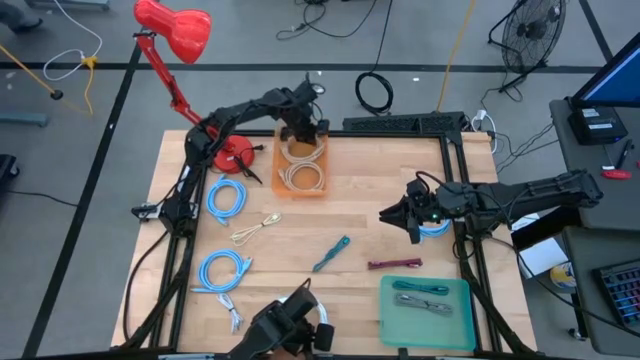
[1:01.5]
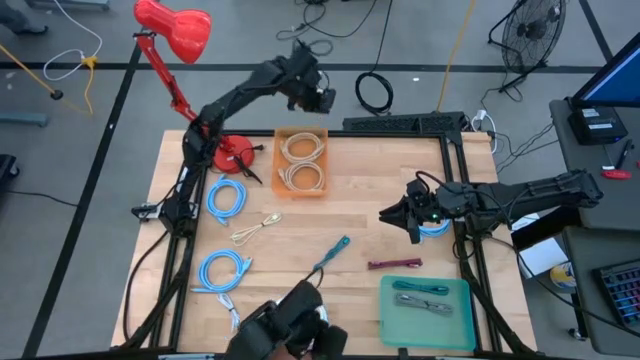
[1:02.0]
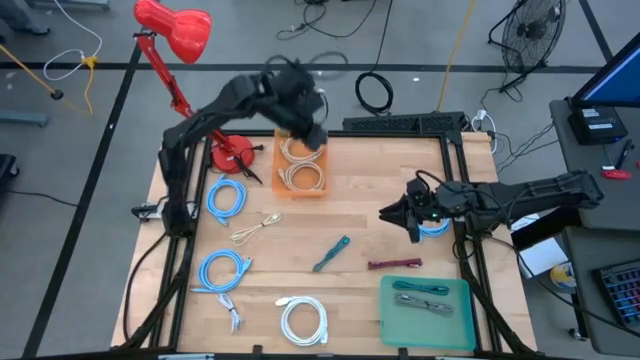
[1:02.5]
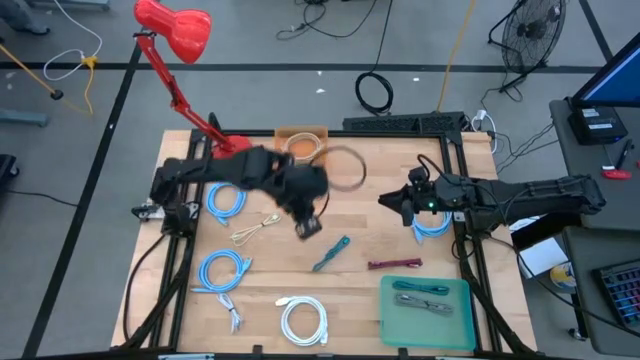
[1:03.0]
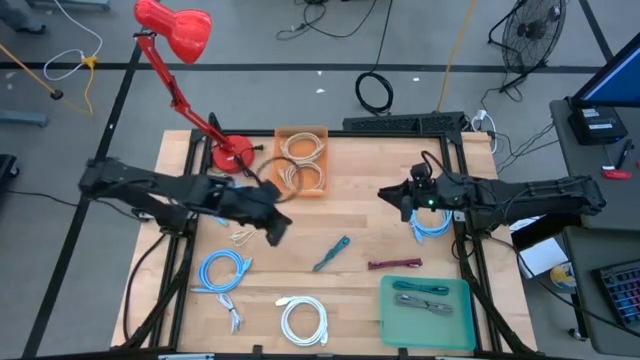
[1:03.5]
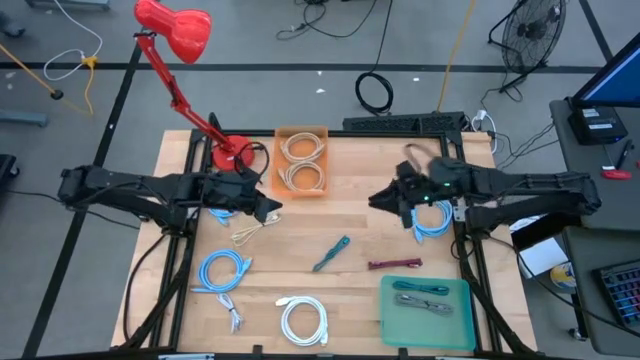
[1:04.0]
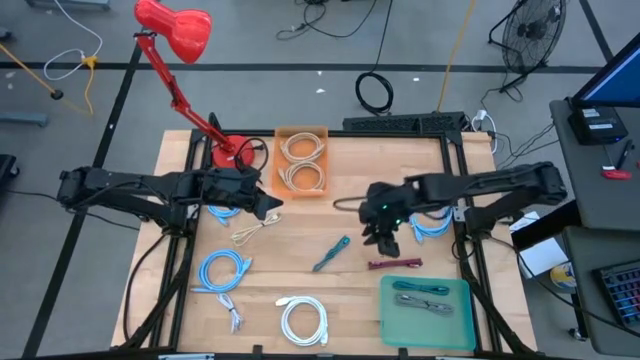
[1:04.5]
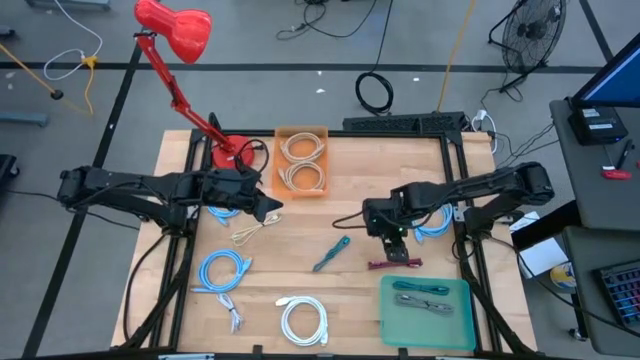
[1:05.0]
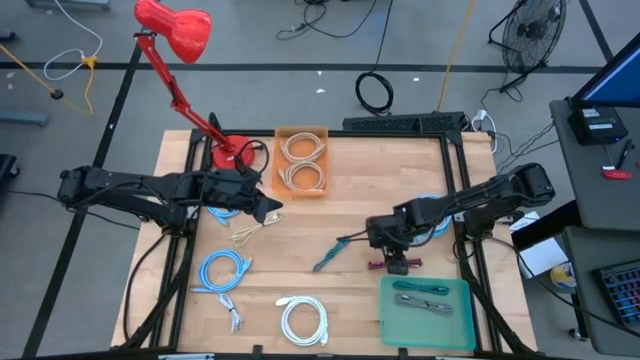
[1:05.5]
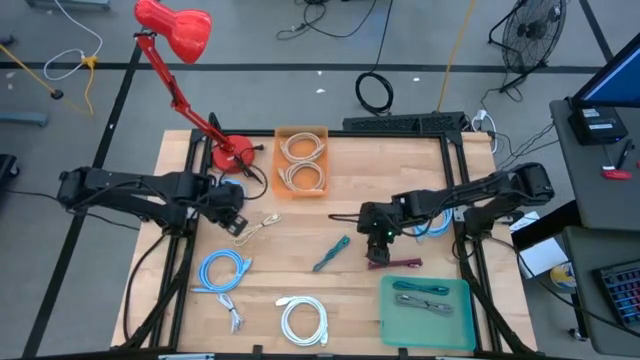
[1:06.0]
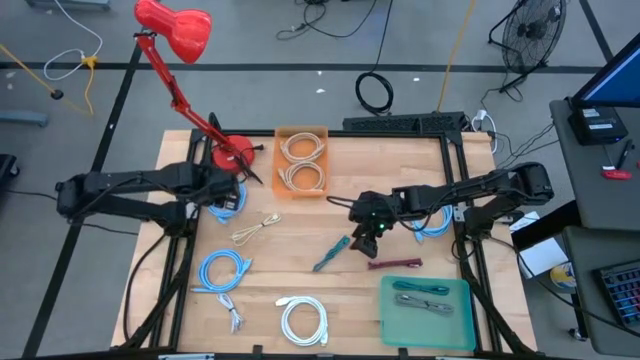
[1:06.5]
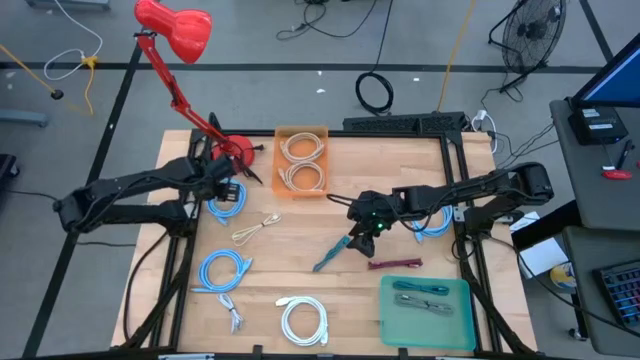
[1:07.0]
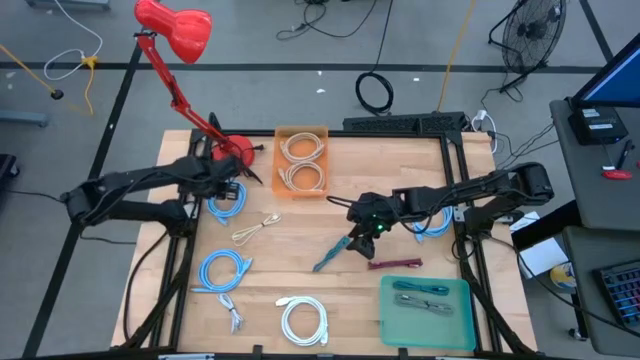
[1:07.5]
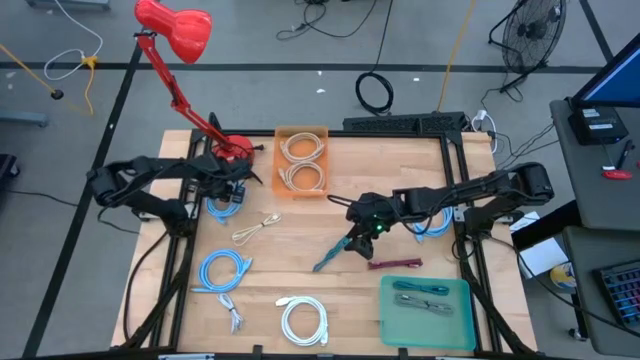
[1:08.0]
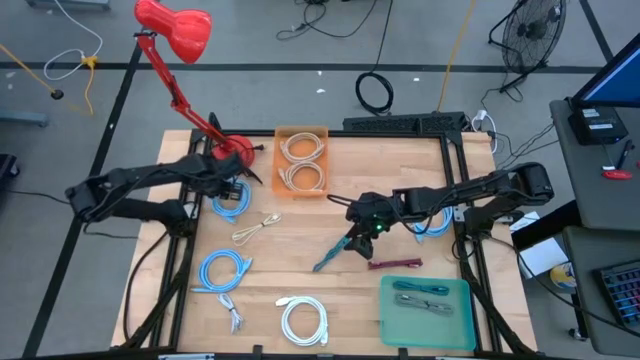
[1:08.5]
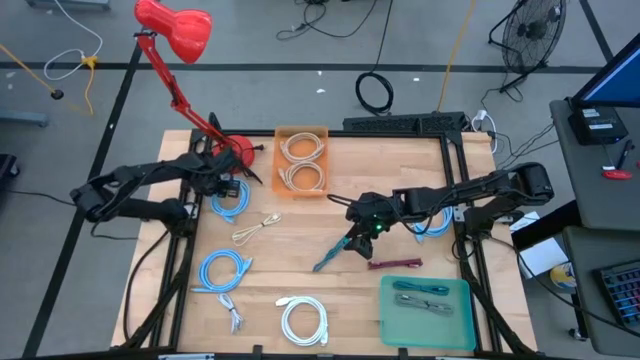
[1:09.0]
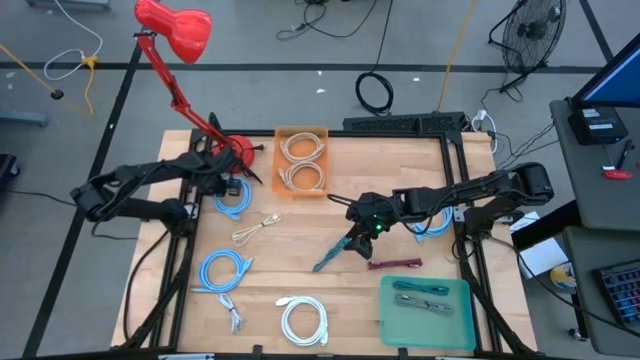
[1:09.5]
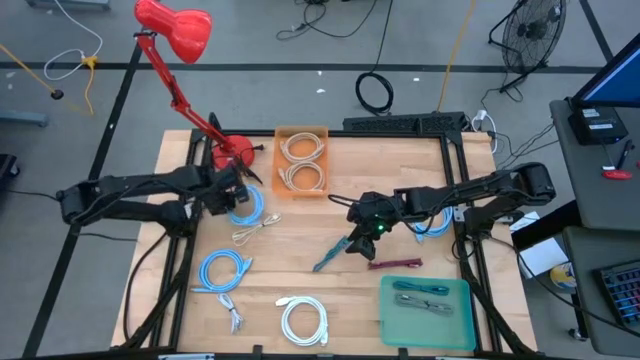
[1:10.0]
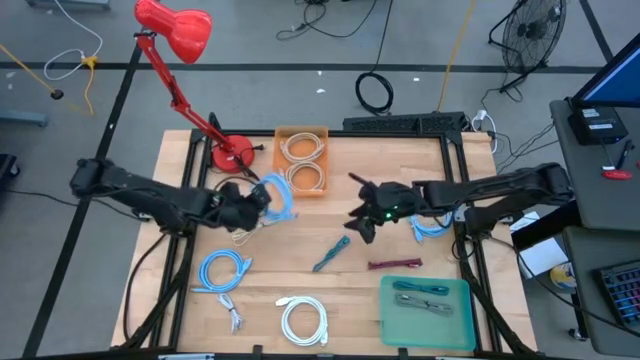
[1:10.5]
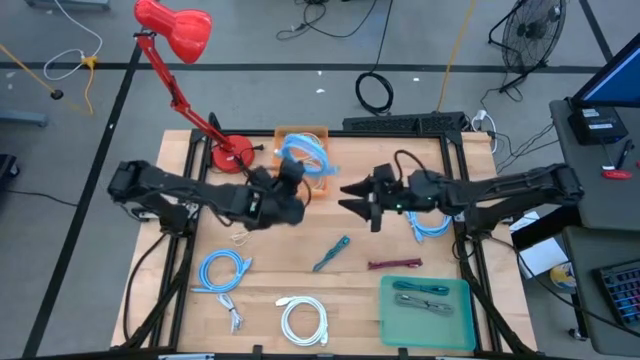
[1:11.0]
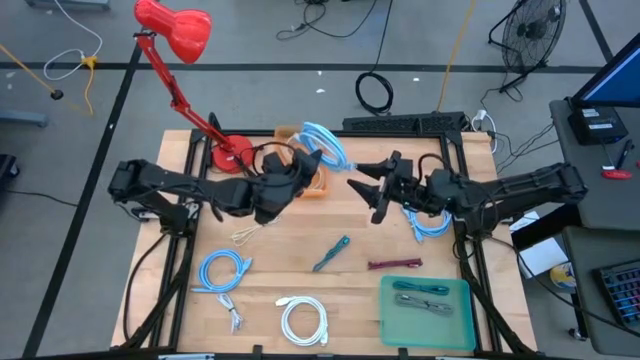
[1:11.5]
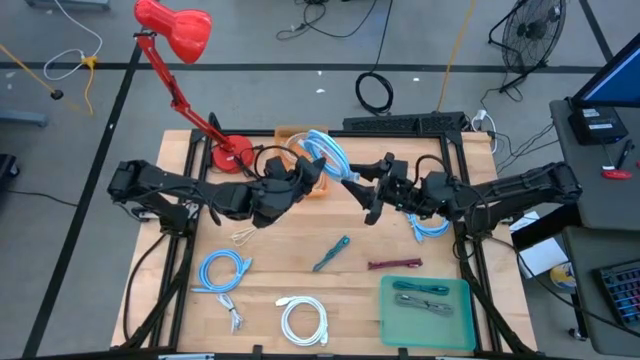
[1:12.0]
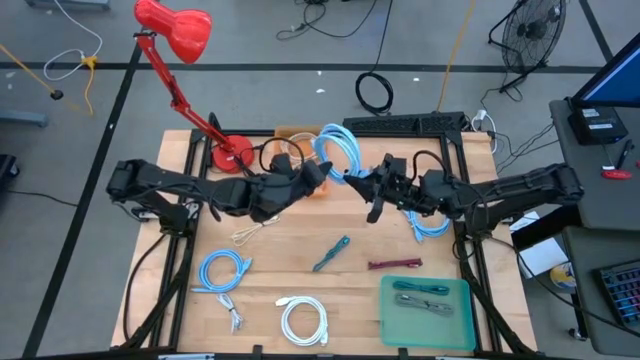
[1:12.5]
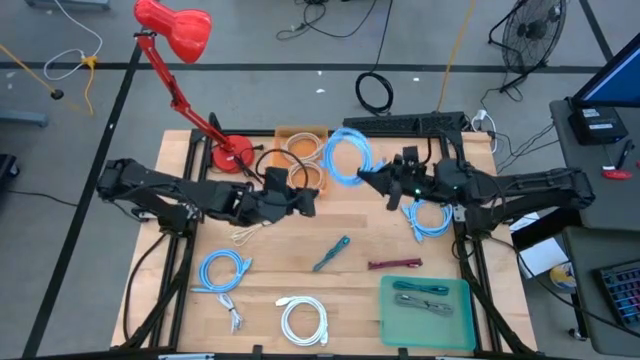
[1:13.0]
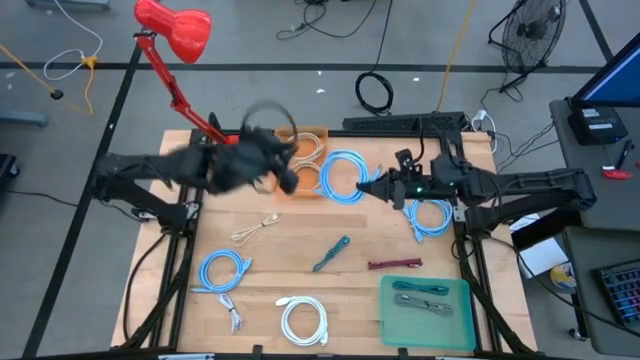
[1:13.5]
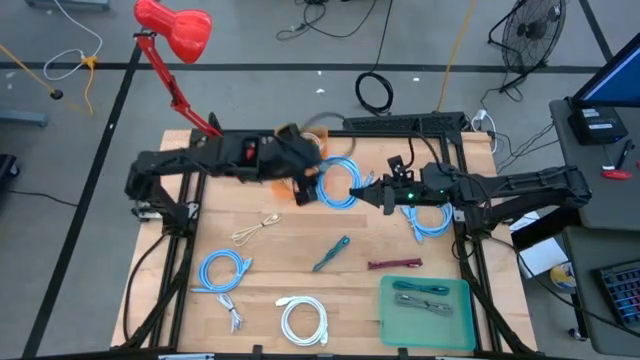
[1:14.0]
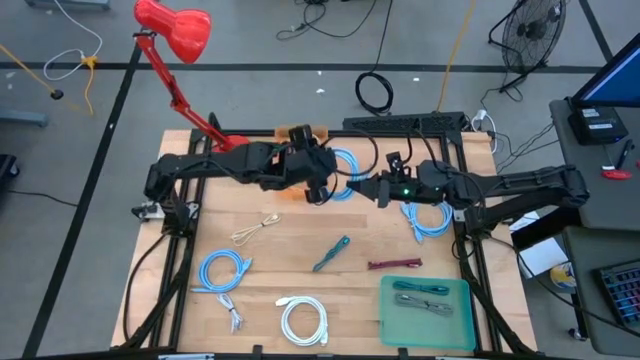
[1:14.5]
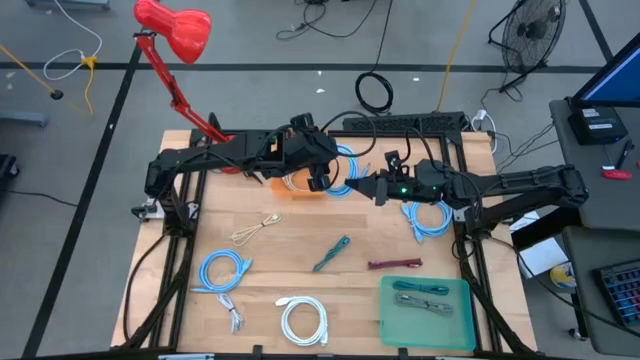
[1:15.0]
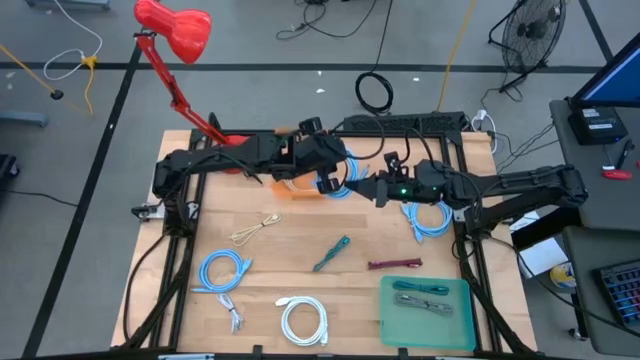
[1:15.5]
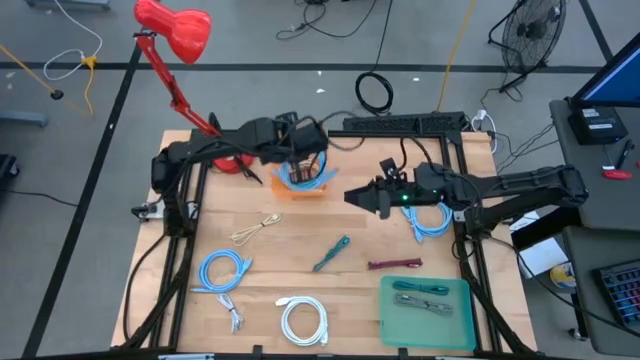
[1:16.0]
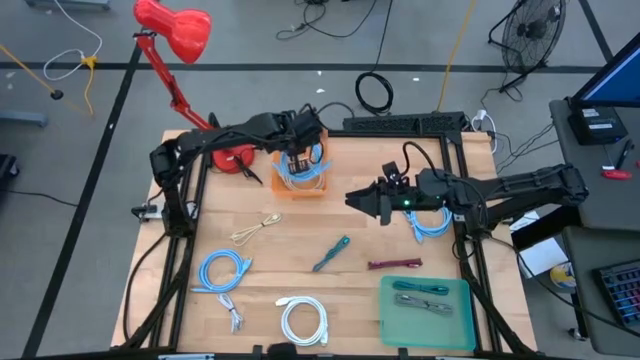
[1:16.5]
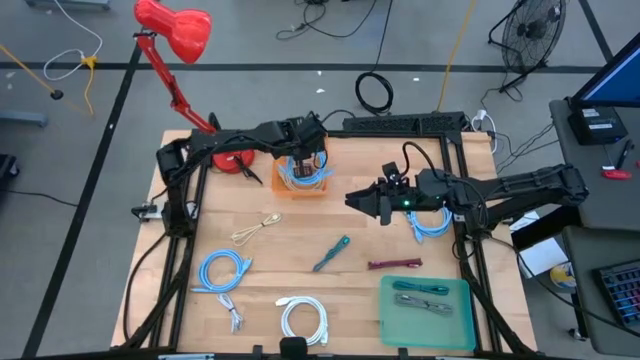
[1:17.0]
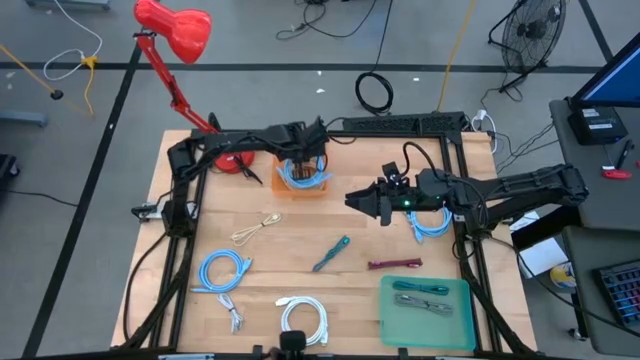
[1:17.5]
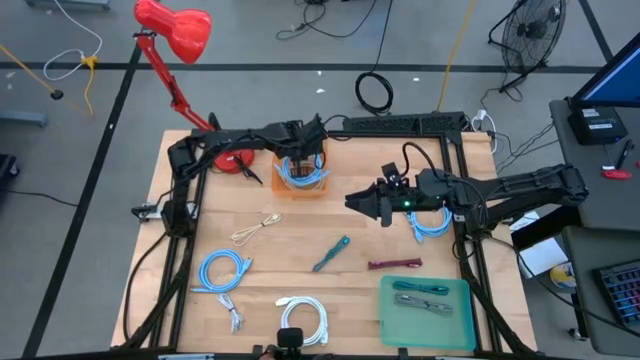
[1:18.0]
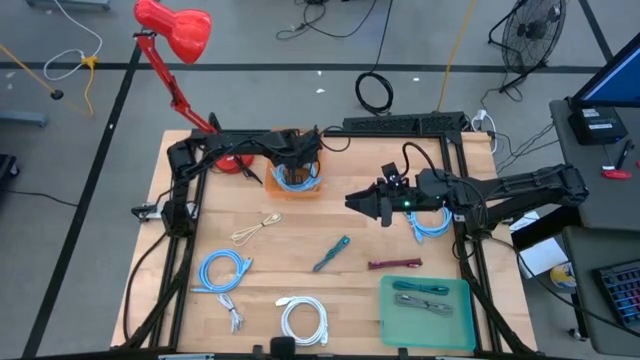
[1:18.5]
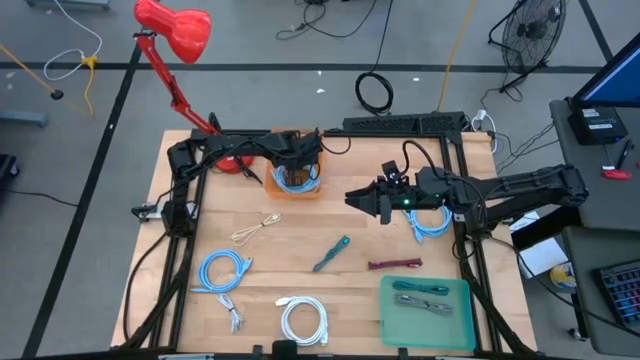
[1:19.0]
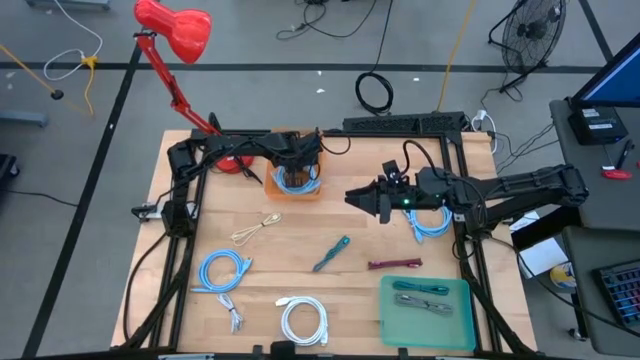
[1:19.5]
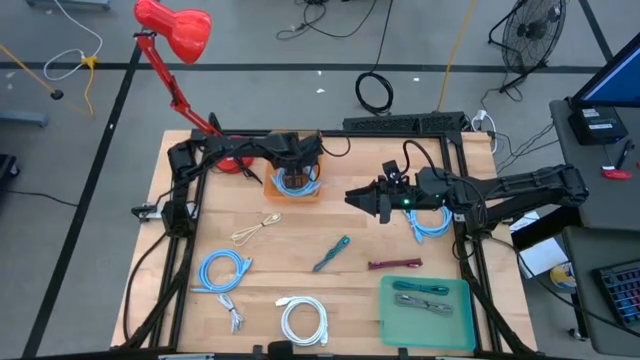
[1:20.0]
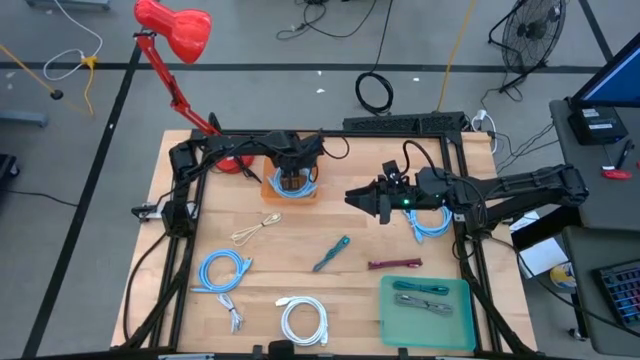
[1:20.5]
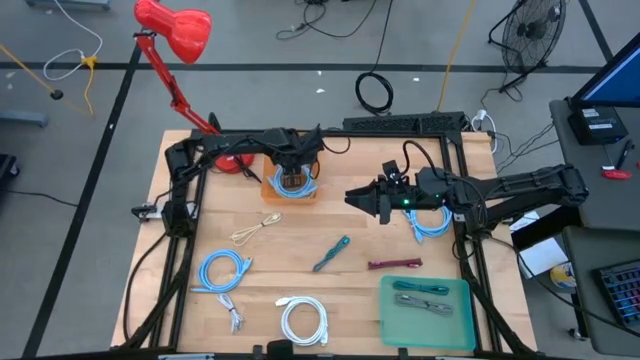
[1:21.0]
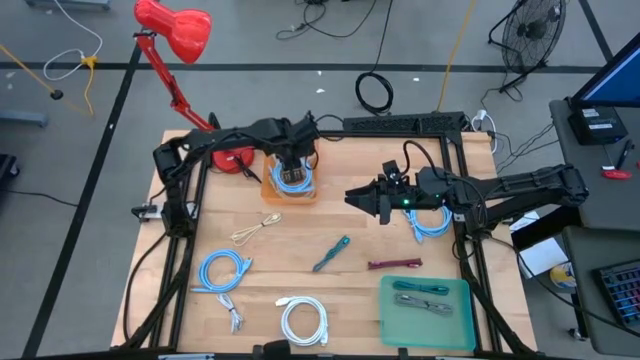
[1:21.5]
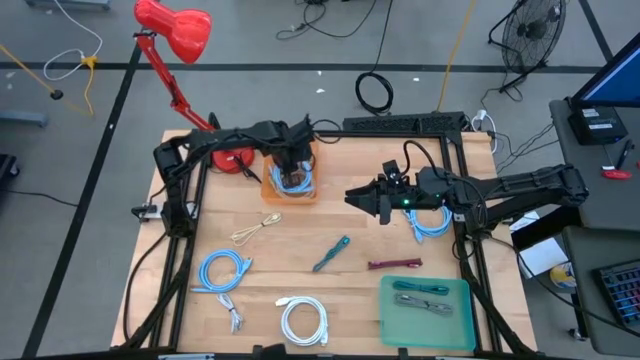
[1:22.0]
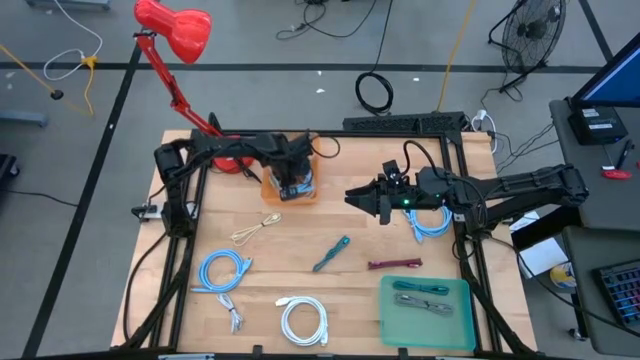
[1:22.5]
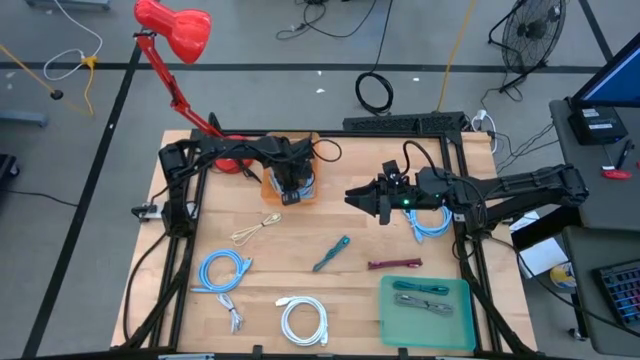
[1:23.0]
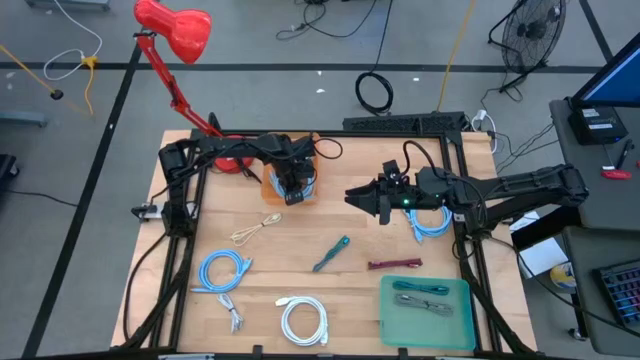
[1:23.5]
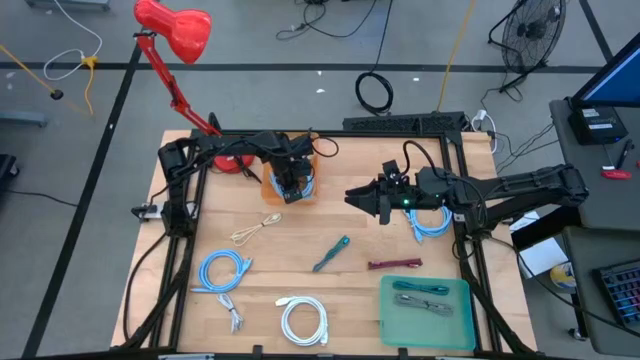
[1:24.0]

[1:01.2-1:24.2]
Task: Pick & Place USB Port
Put the top left light blue wire cable into the orange bin
